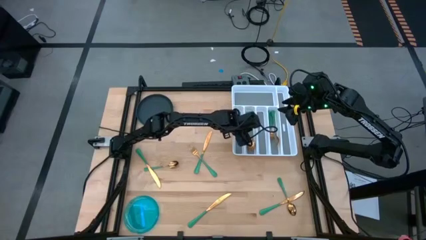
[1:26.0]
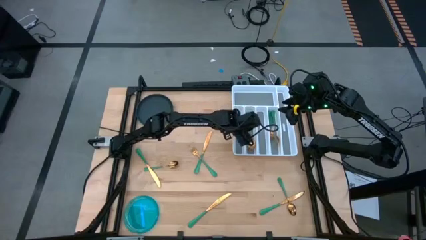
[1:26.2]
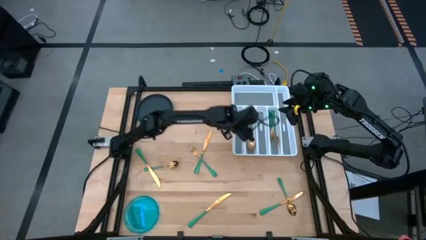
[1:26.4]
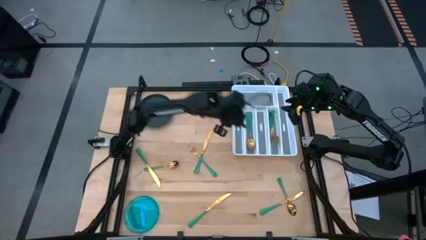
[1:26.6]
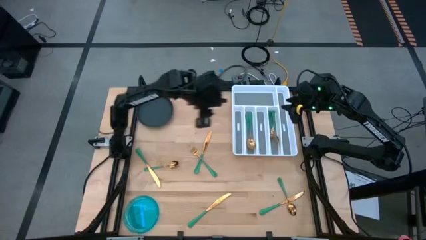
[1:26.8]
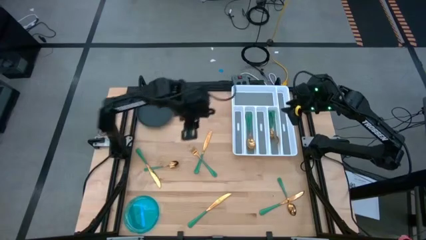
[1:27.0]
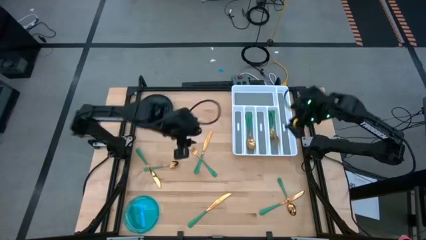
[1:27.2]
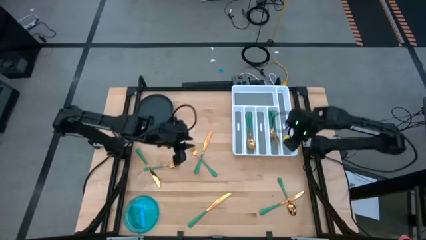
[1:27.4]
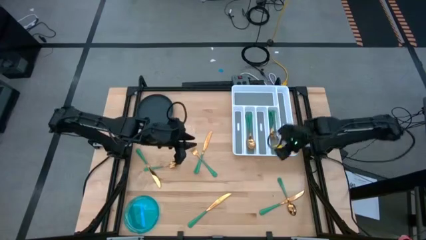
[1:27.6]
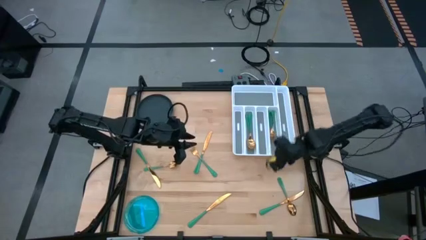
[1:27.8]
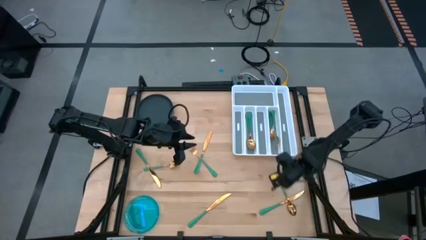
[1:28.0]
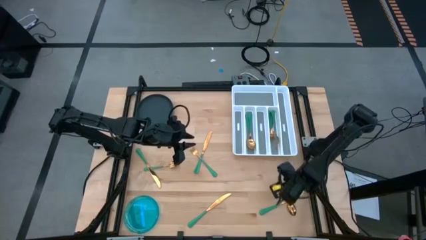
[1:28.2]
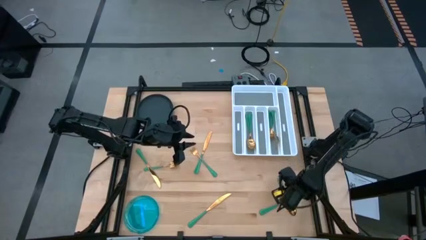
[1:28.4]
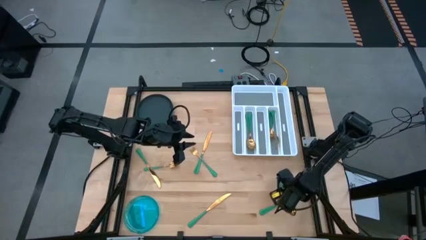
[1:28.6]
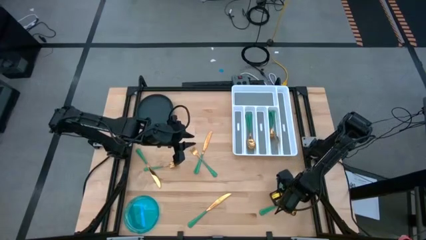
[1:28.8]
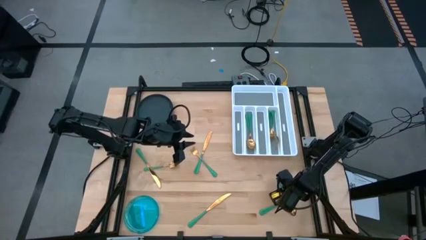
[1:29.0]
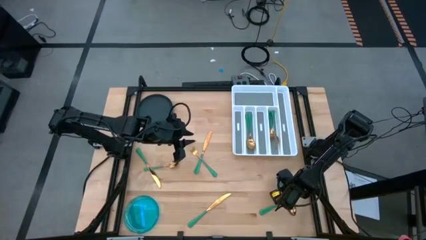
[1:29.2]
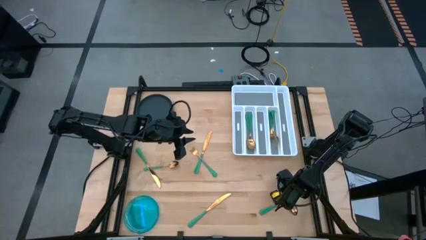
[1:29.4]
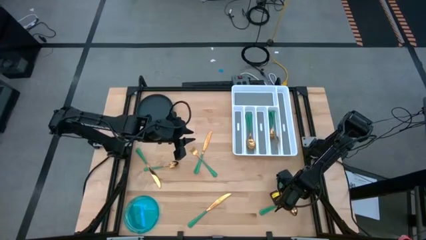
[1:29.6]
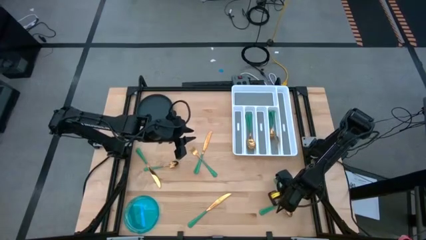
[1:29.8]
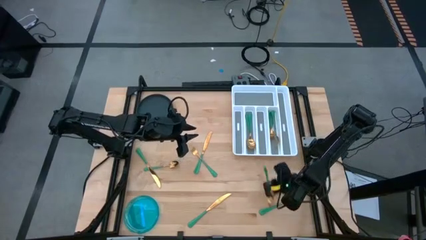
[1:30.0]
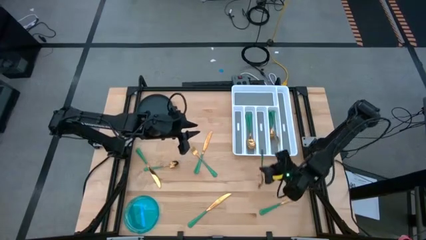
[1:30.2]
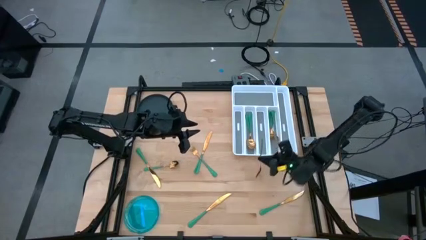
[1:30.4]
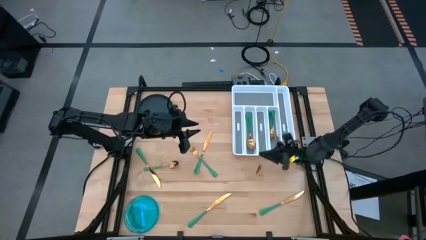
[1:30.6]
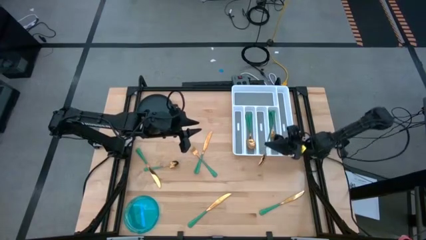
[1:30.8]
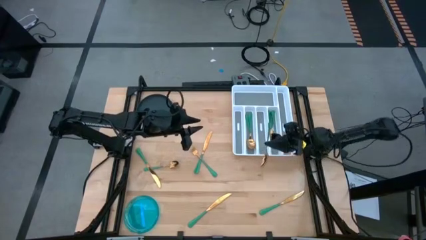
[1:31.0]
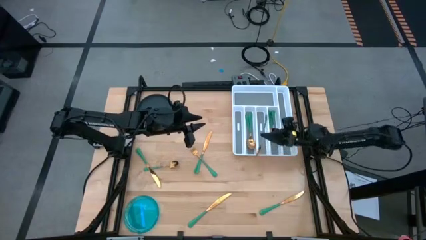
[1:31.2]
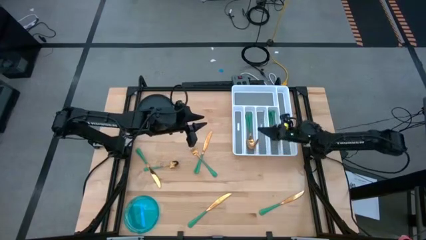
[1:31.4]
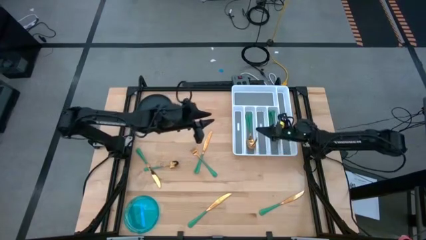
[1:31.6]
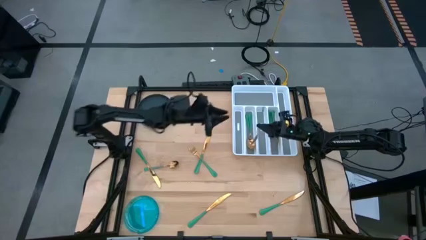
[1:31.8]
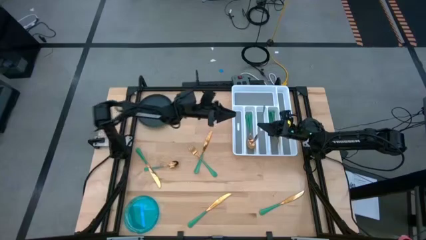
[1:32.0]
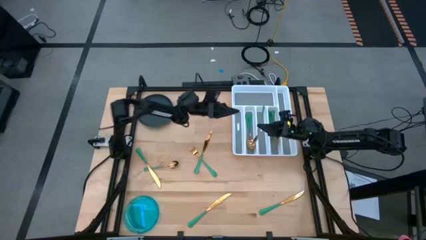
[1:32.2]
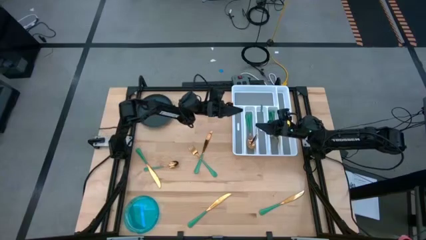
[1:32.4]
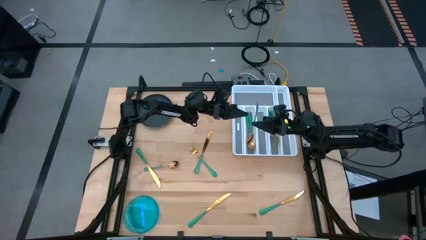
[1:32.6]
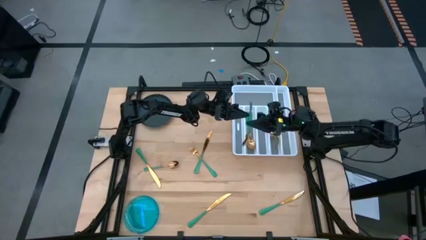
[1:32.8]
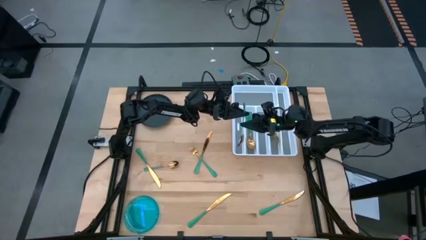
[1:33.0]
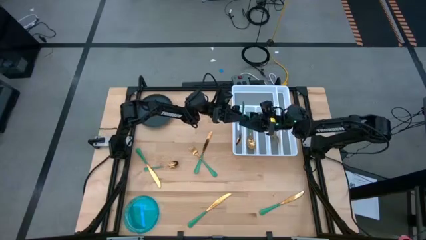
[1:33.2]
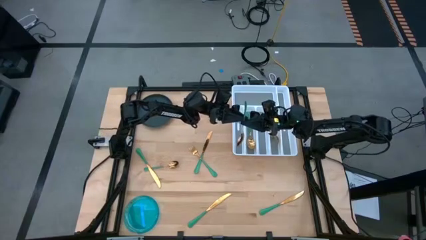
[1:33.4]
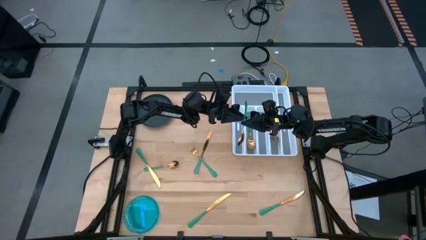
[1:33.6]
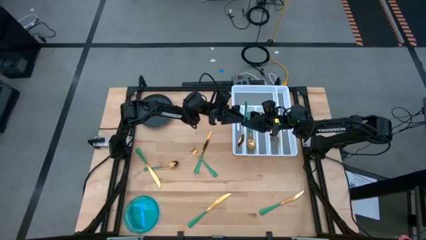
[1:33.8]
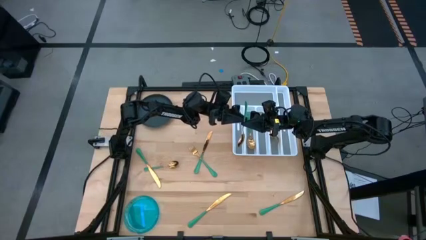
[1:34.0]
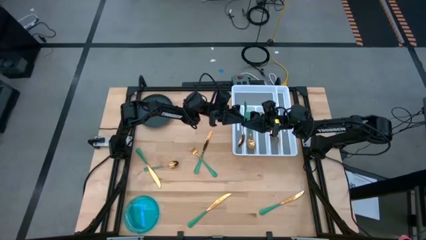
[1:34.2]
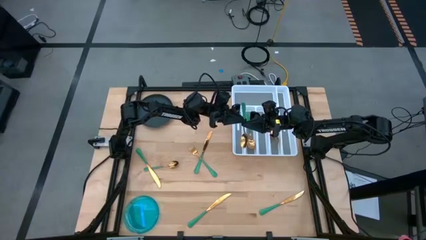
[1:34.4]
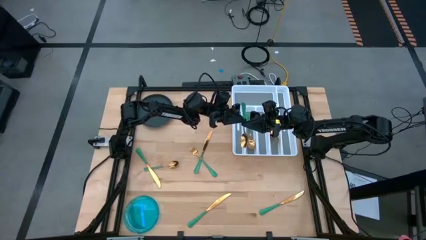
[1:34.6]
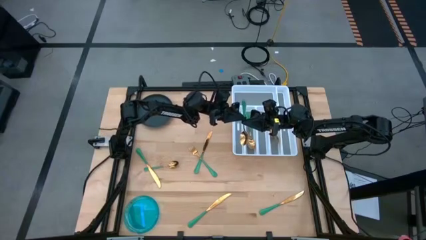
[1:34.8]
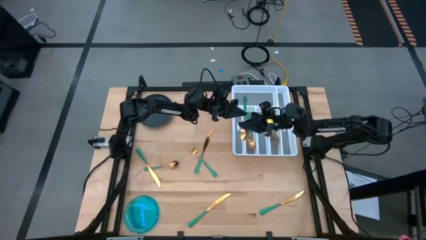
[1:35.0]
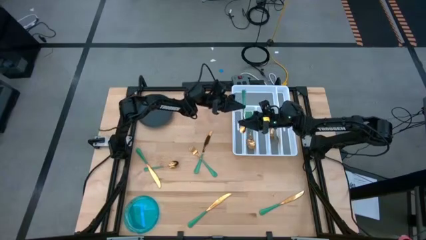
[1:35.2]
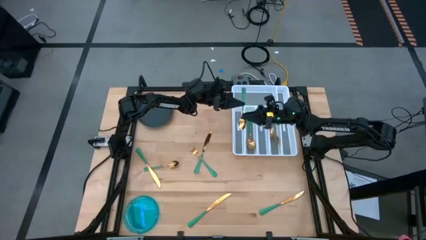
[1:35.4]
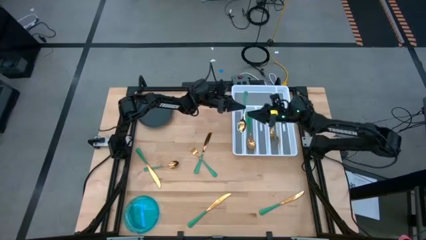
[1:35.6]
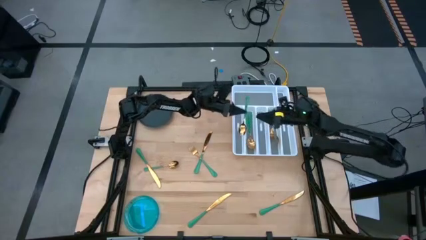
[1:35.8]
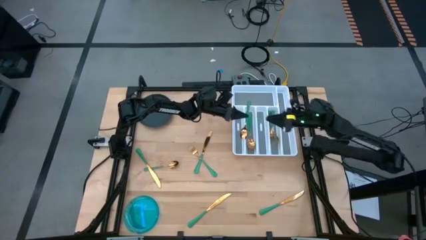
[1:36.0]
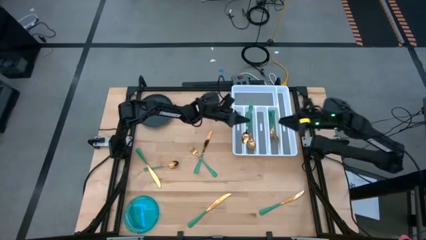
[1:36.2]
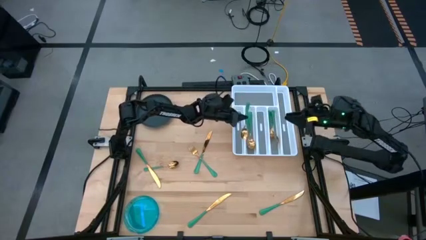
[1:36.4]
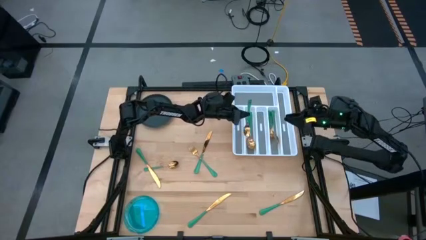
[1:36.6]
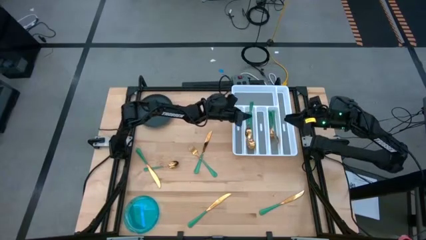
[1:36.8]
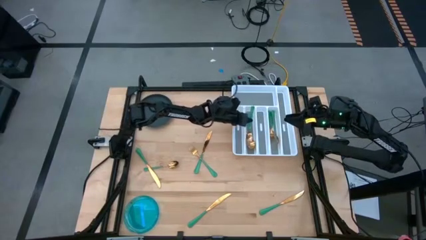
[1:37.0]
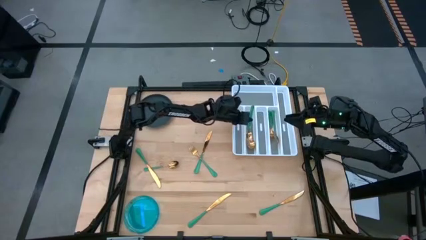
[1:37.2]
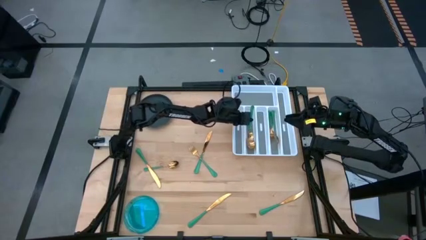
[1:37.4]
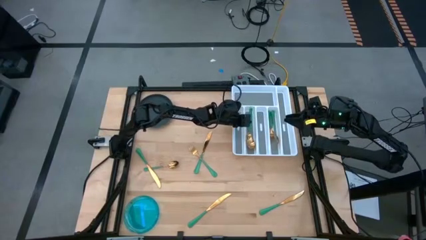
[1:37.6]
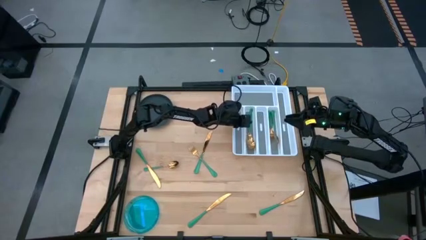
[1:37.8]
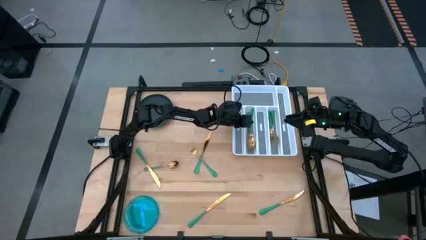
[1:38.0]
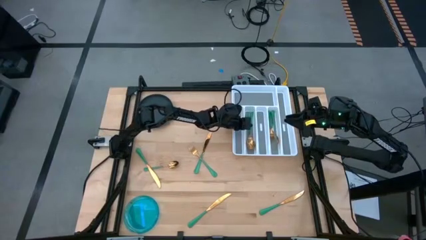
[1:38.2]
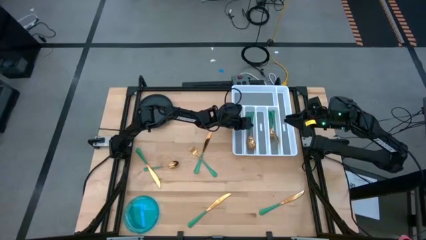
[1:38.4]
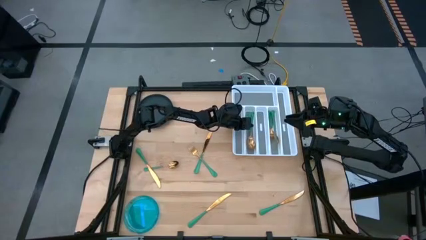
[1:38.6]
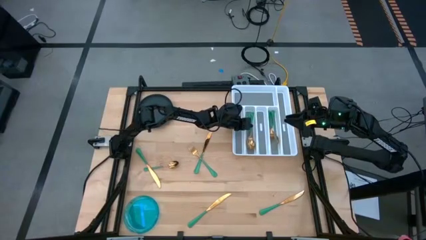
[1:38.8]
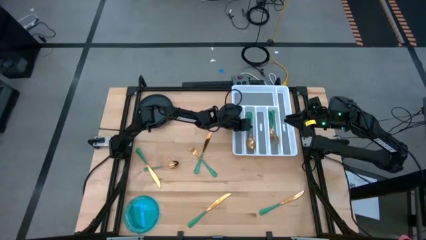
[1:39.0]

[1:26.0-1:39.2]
Task: Sort silverware
Put the bottom green spoon into the silverware tray
